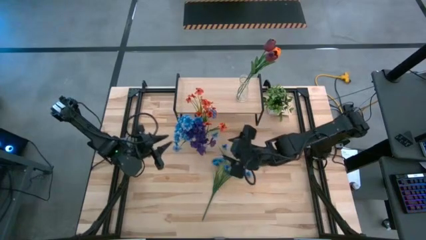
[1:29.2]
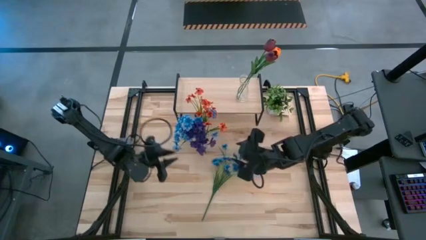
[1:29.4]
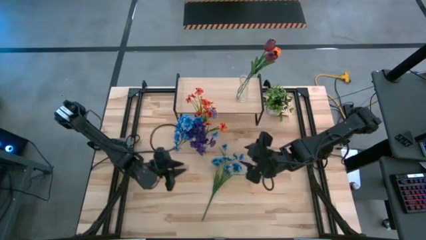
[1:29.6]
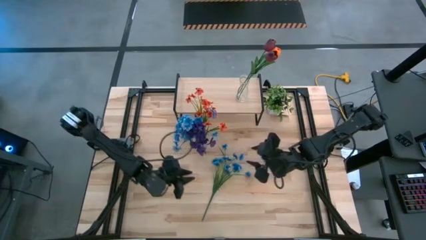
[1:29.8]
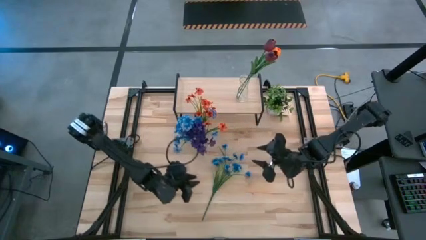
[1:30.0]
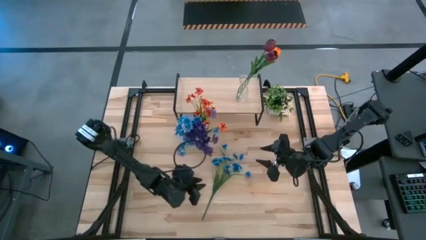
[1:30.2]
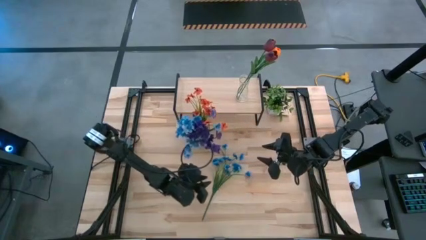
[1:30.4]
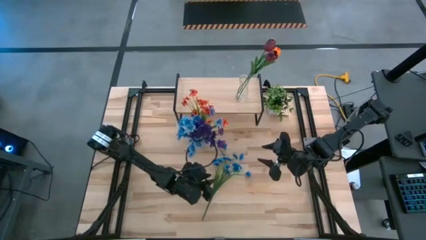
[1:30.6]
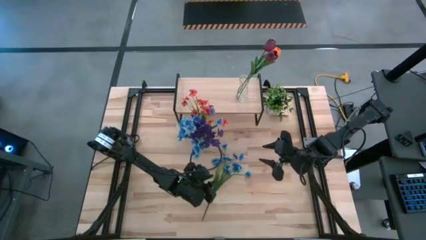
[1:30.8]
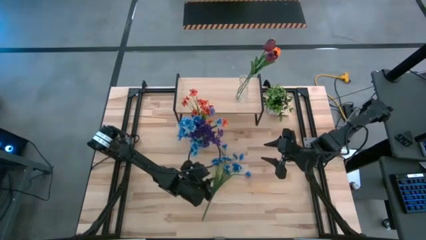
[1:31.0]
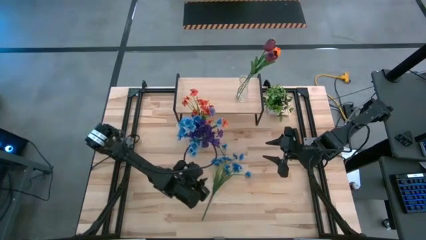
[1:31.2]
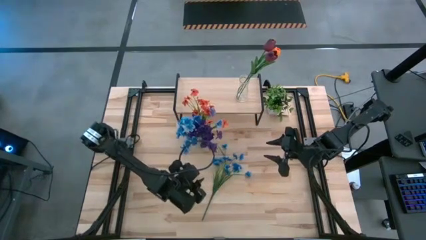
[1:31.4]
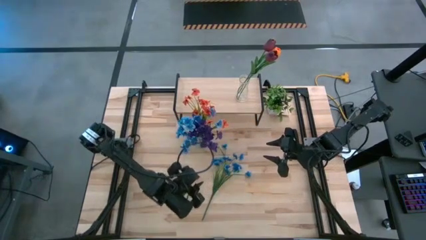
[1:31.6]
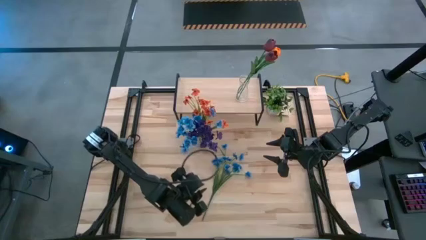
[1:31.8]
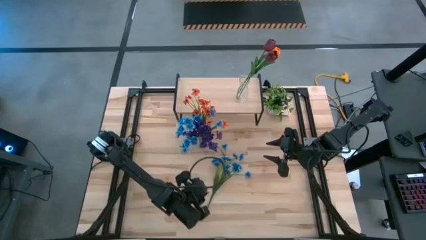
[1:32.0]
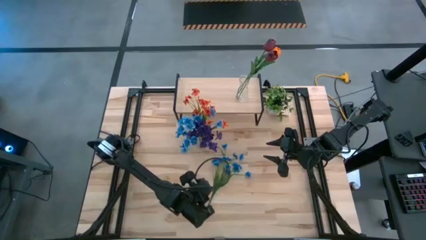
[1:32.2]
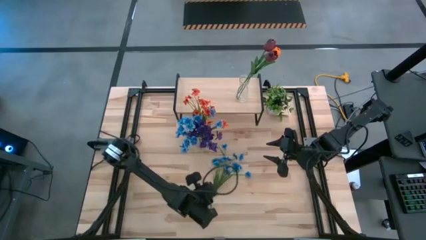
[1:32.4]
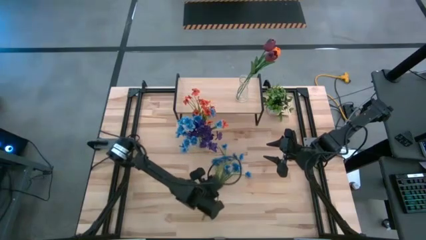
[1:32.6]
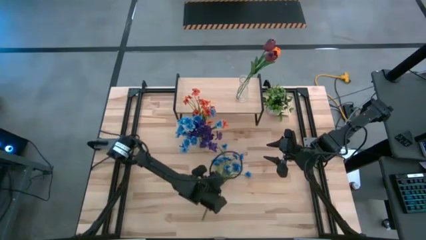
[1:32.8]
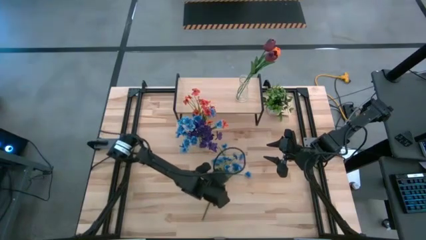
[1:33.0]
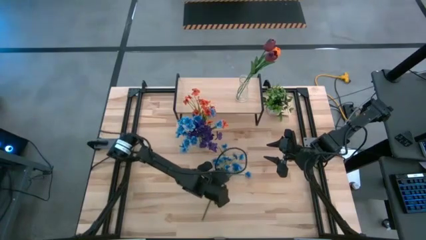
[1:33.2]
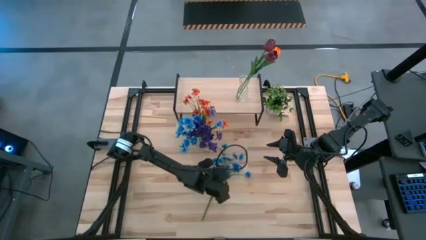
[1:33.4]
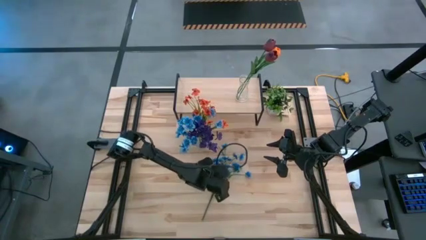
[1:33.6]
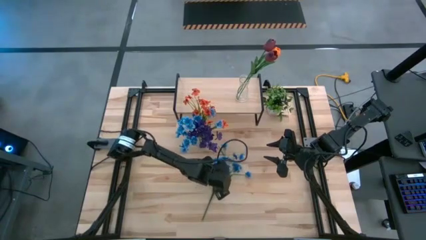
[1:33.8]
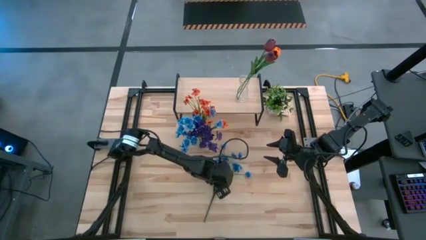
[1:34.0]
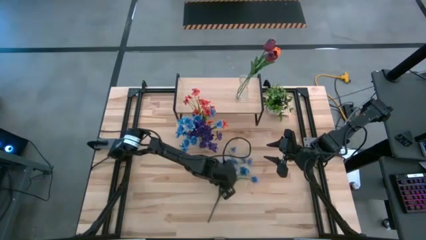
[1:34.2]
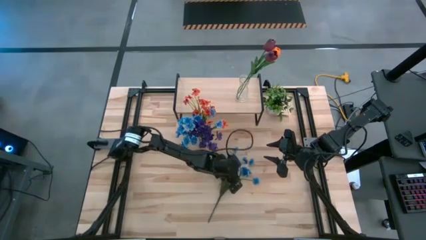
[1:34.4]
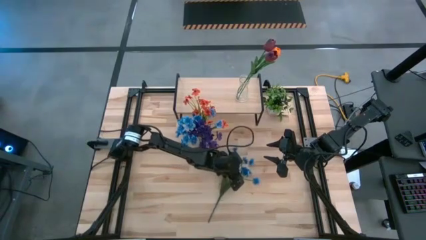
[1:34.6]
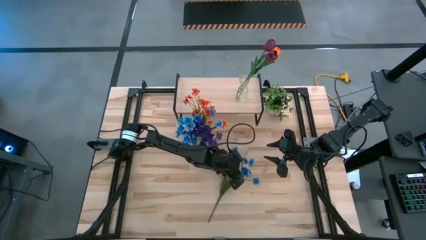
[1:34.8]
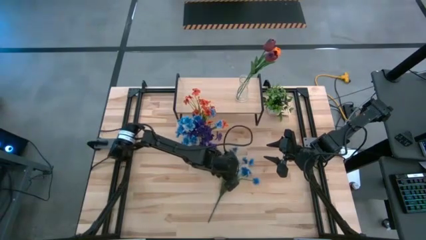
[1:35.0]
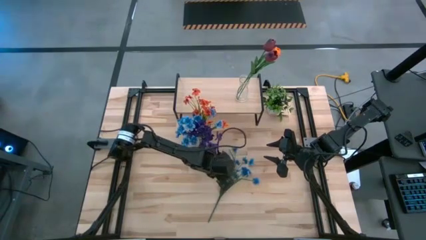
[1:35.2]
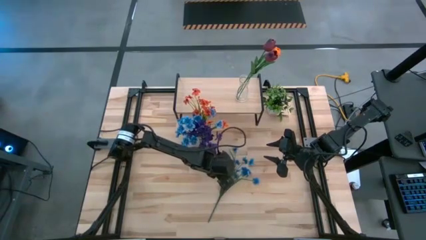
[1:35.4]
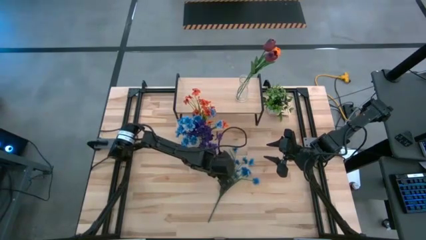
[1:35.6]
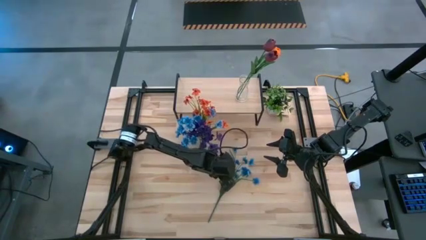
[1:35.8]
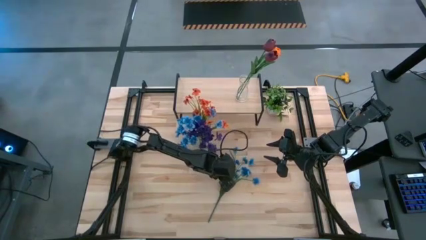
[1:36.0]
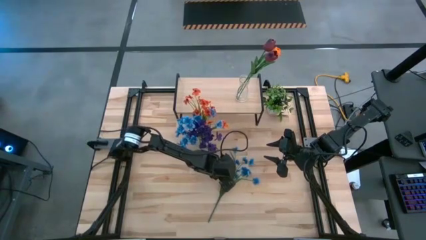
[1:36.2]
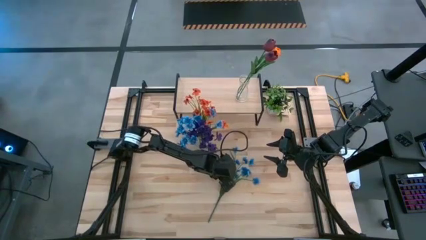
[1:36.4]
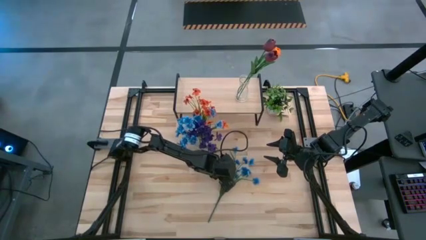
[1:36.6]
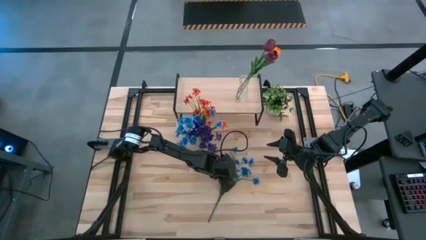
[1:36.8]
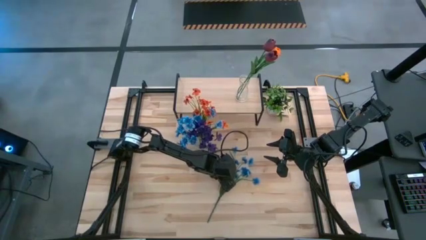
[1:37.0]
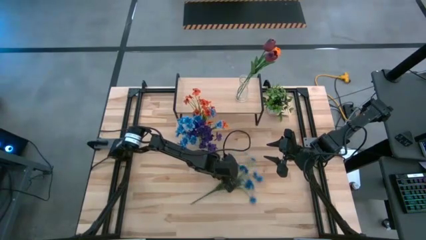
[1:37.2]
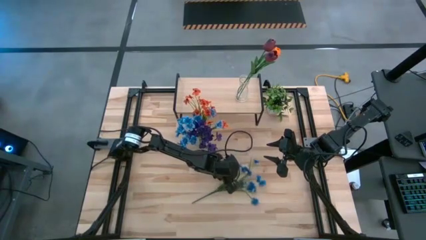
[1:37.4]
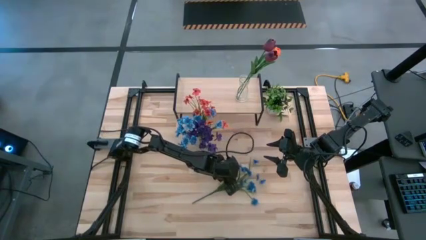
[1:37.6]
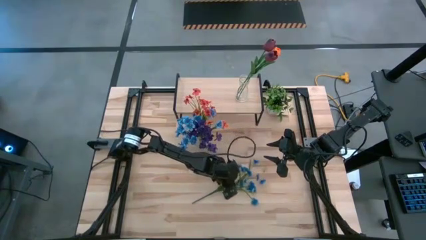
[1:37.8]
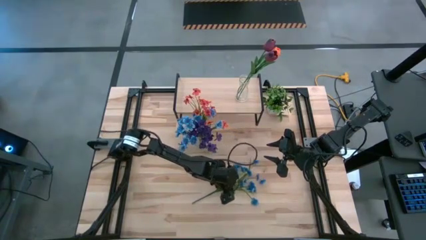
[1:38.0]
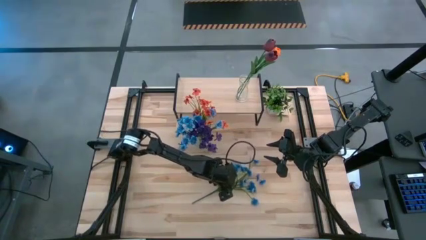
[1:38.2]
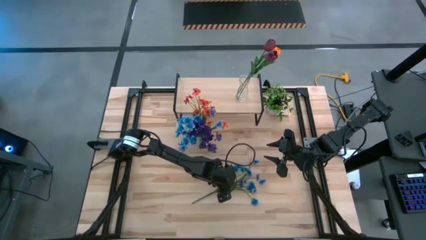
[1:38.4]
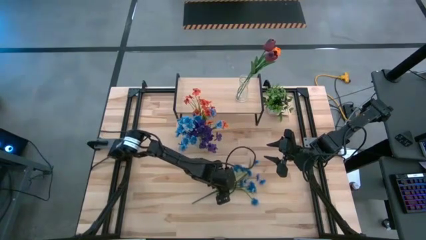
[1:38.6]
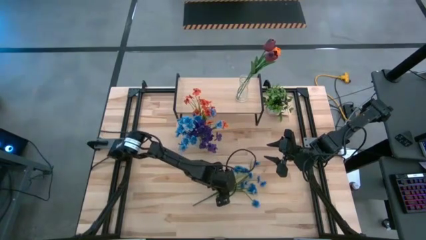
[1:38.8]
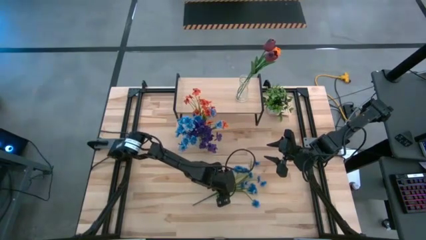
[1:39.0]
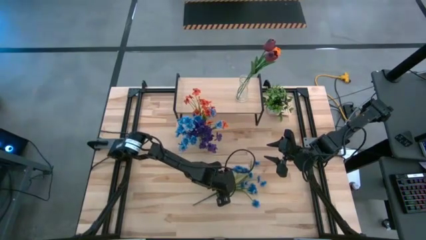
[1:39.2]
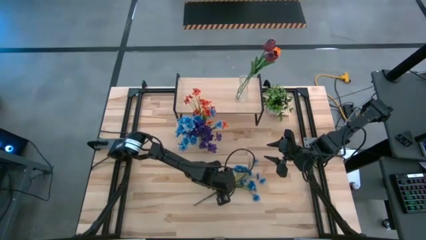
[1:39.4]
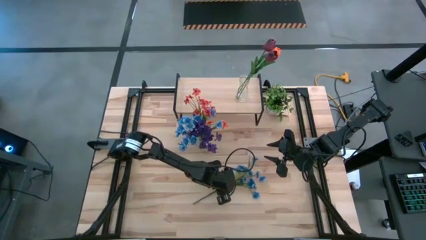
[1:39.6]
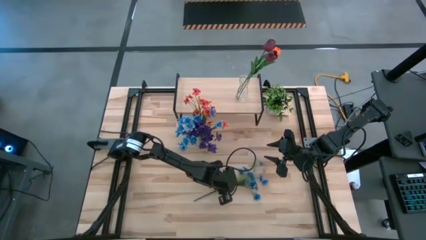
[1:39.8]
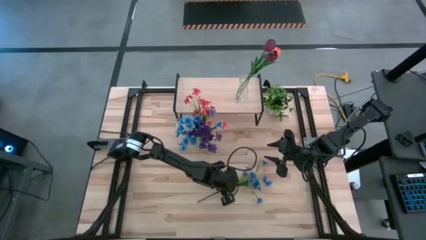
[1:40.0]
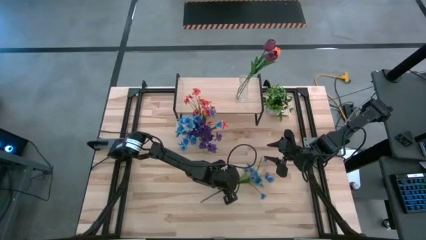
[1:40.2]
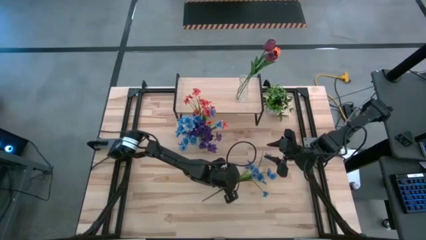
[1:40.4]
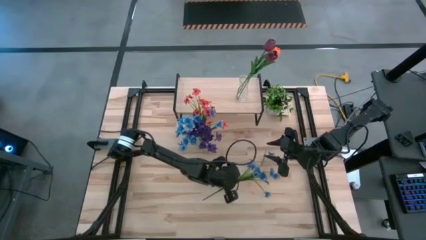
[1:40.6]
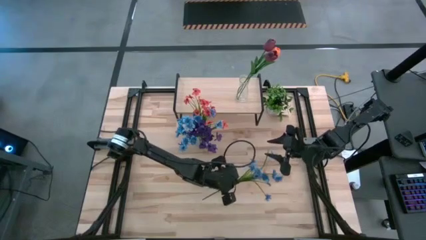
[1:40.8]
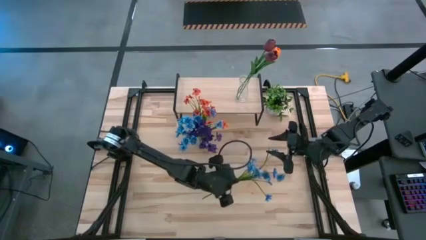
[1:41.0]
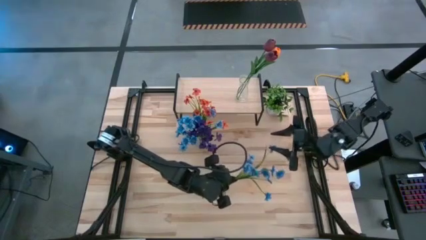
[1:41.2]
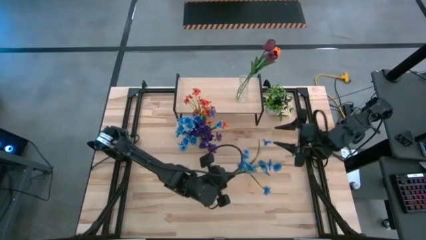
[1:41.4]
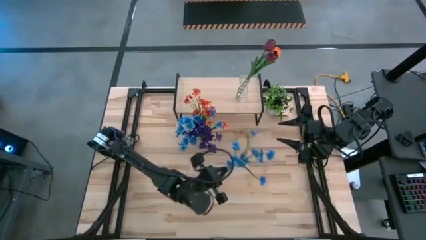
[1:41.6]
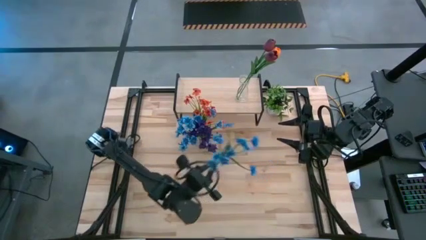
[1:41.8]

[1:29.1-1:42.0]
Task: Pick and place flowers into a vace then onto a shelf
Put the blue flowers into the transparent vase
